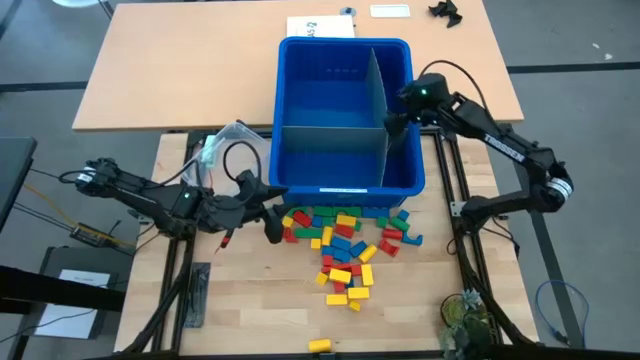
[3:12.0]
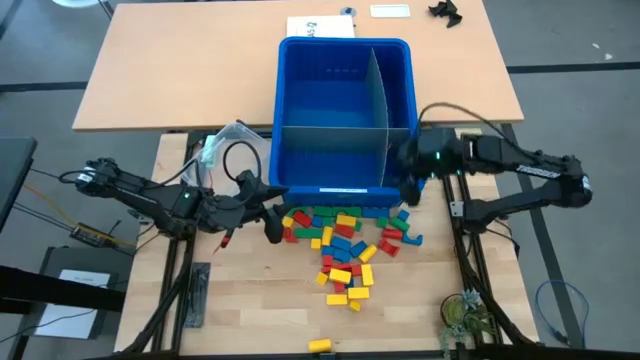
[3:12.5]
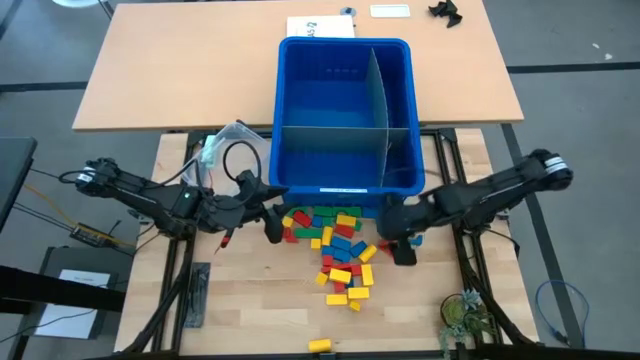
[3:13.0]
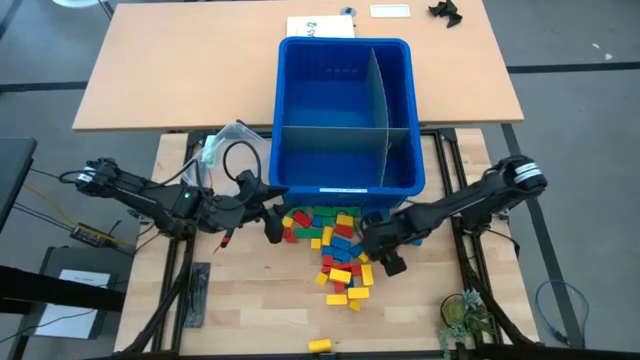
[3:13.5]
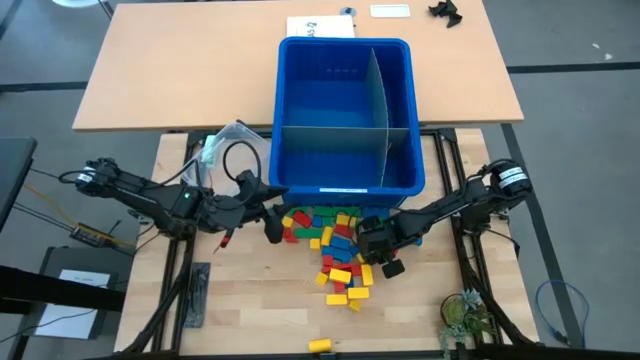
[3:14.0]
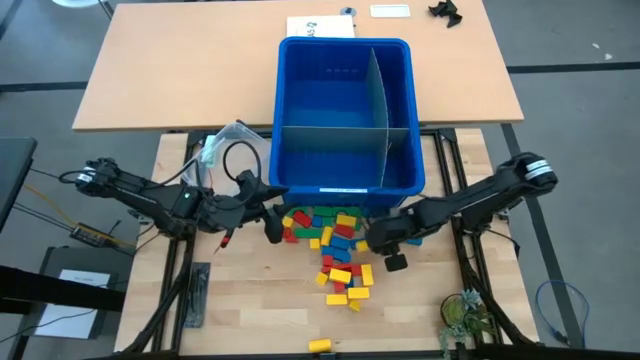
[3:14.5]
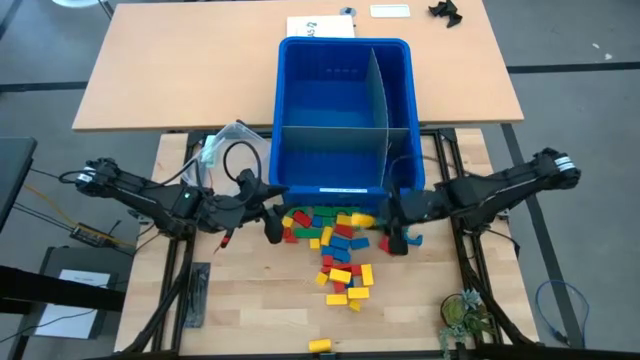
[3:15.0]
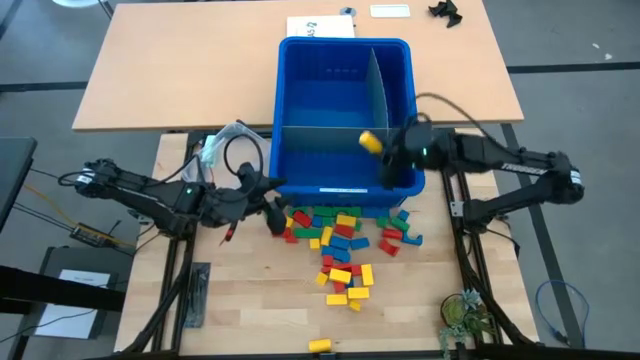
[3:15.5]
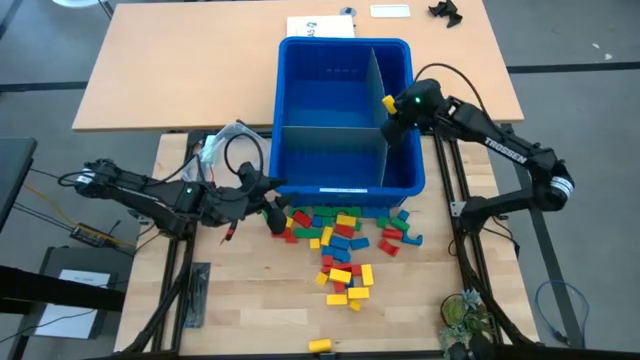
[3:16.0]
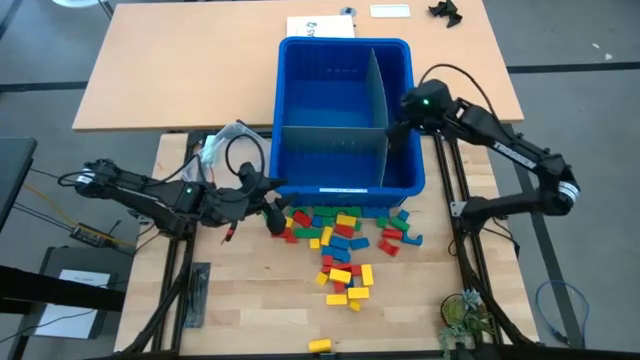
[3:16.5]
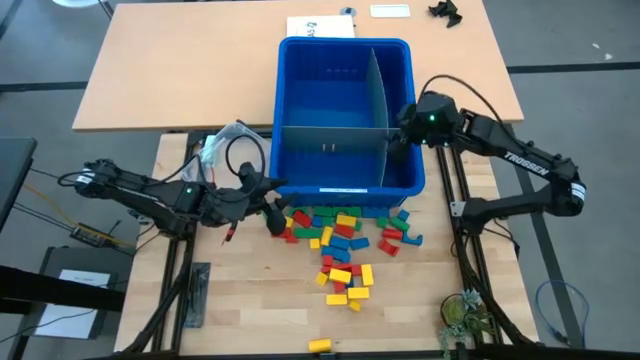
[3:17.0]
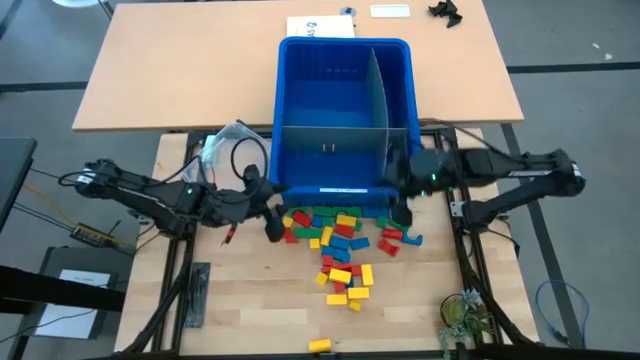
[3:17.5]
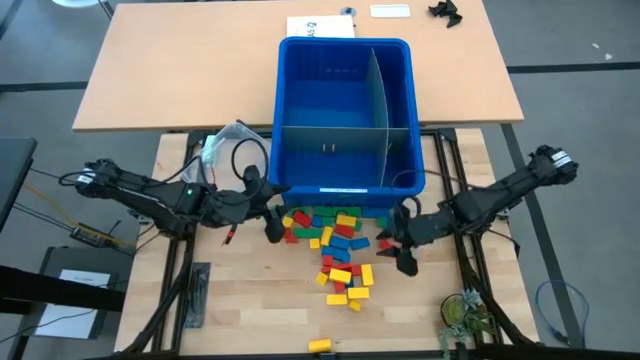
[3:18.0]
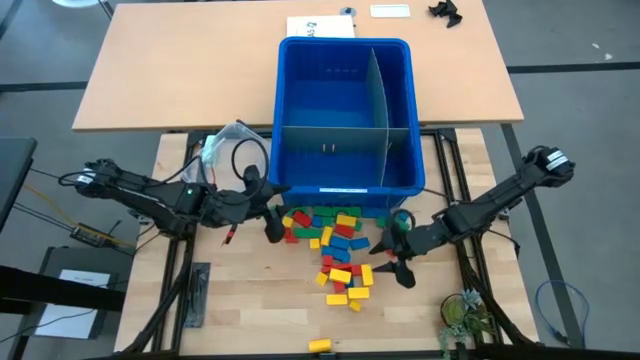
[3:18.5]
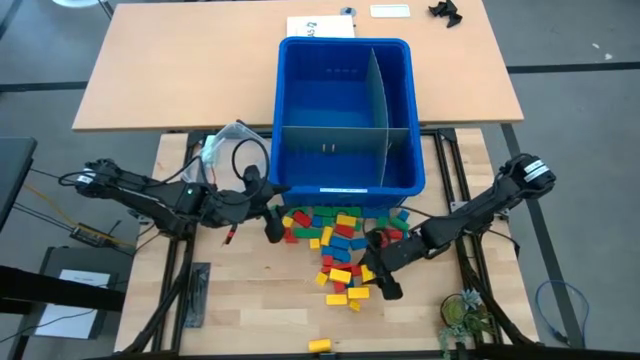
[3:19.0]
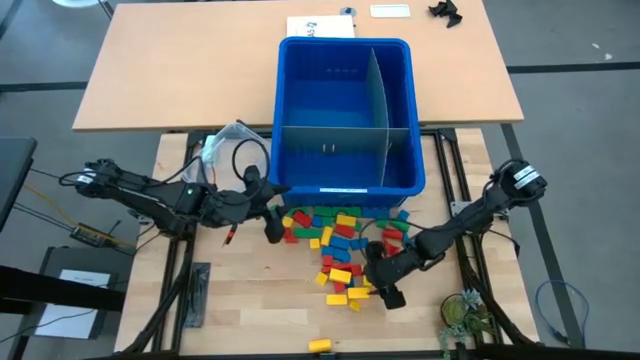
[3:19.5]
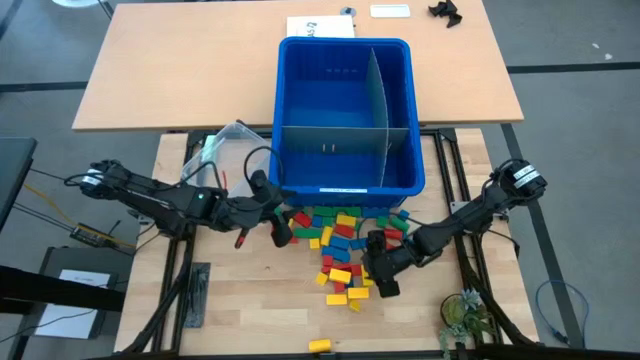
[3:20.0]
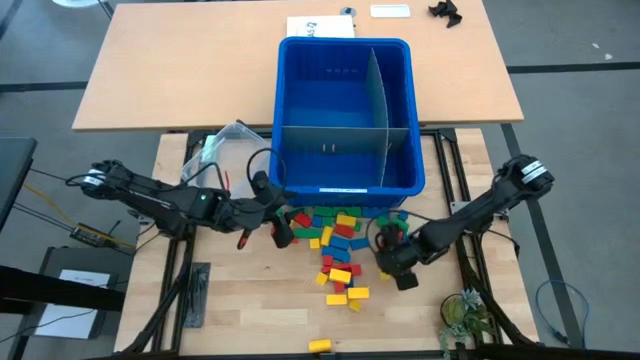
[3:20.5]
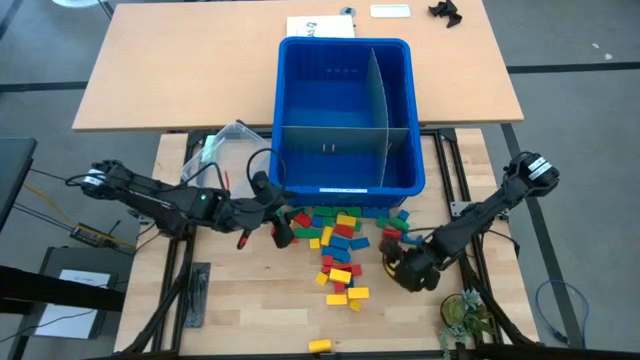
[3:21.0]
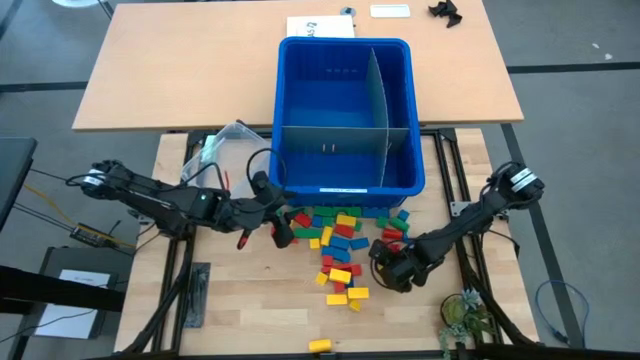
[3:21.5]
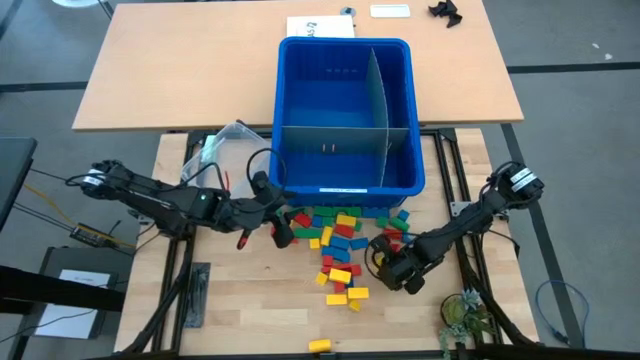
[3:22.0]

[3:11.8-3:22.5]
Task: Sort blocks
Put the yellow block into the blue bin

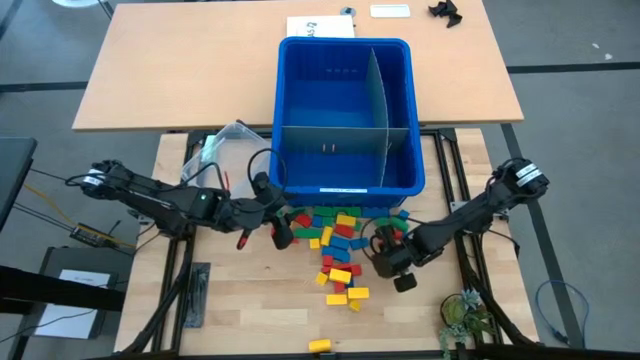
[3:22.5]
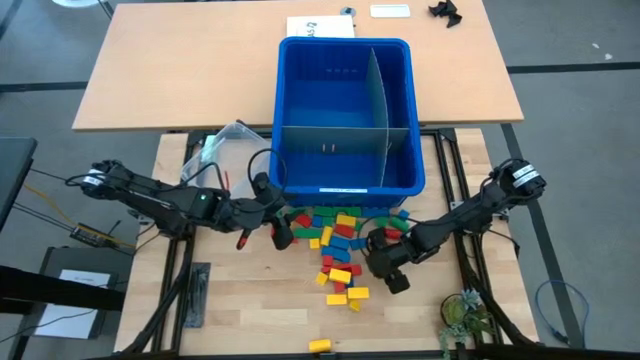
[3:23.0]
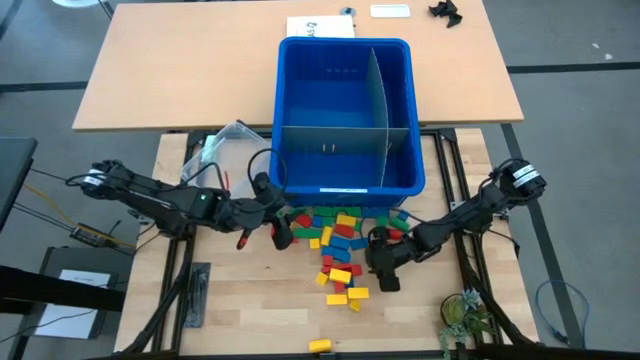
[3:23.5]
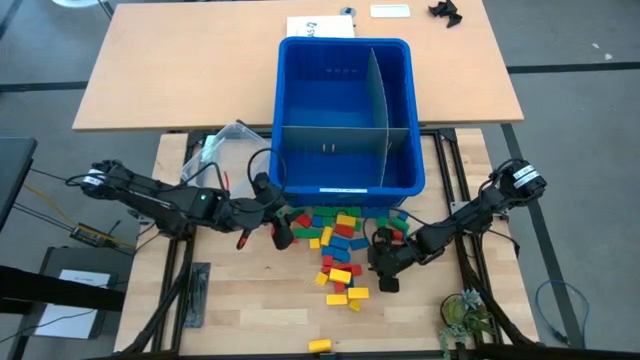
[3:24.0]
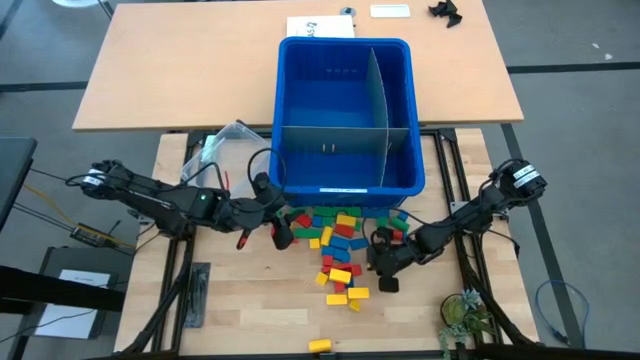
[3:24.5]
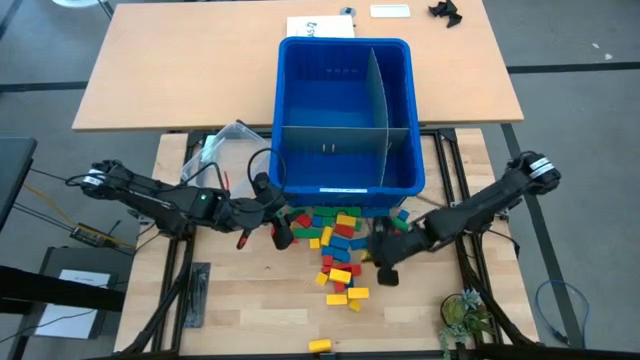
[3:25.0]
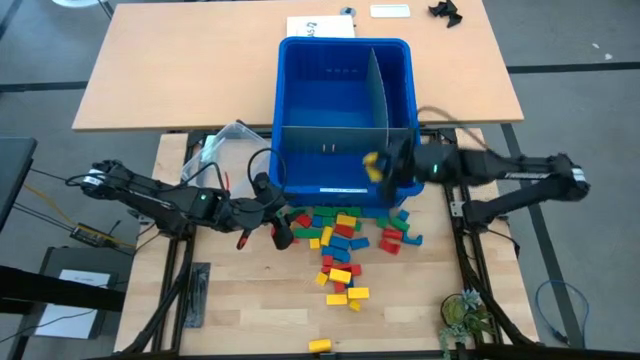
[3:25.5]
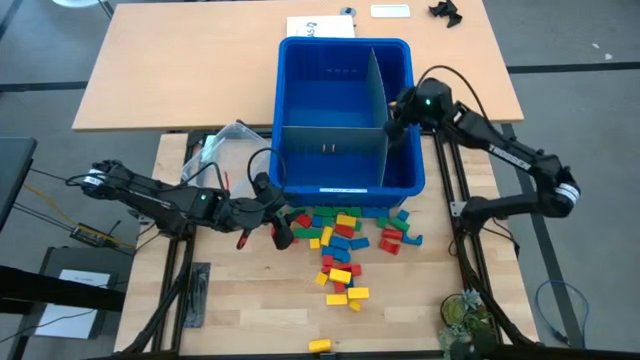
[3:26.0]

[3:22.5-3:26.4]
Put the yellow block into the blue bin

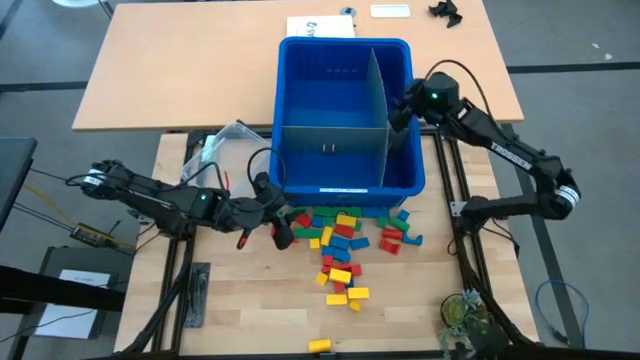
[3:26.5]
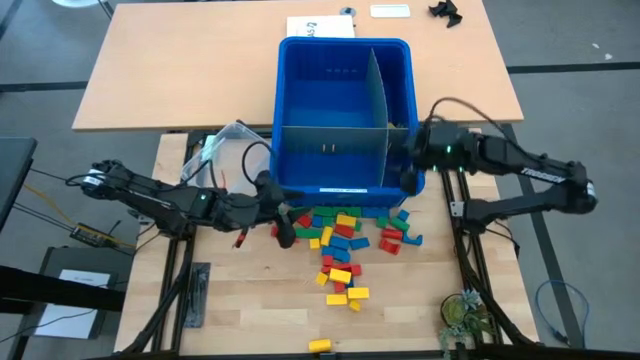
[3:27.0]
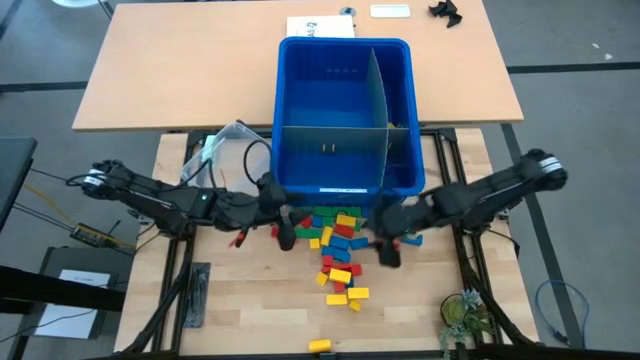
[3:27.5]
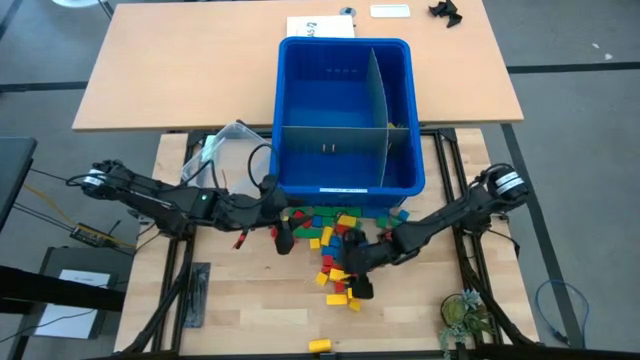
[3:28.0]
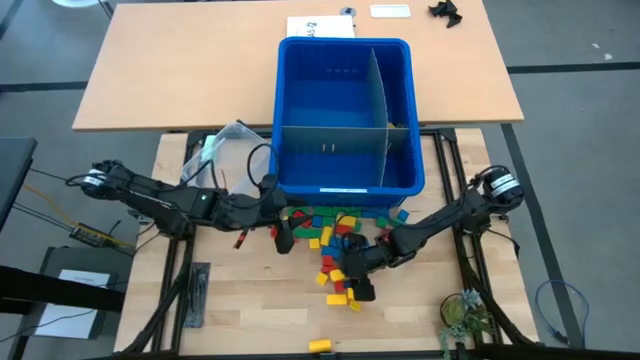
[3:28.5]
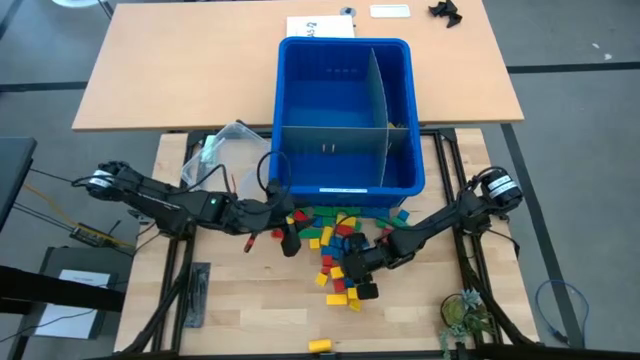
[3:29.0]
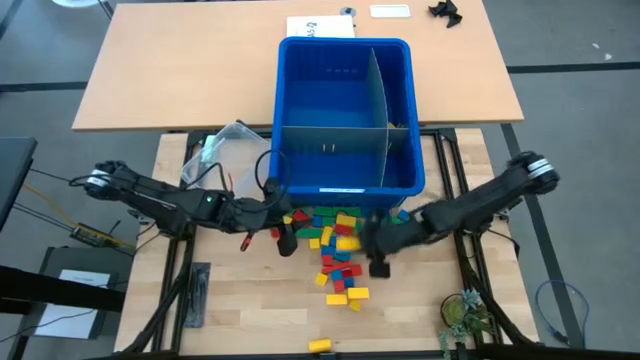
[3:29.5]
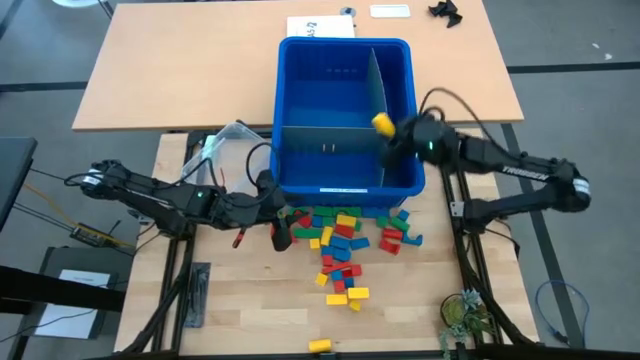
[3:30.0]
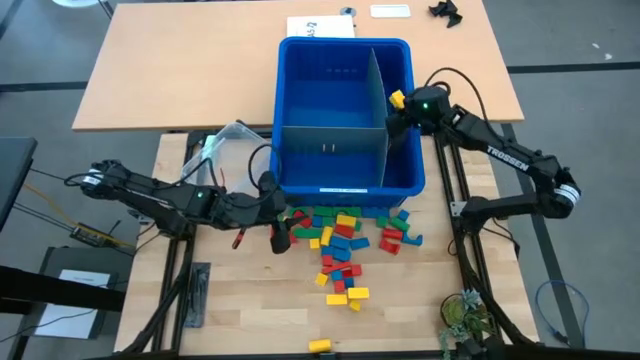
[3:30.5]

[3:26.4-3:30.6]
Put the yellow block into the blue bin
